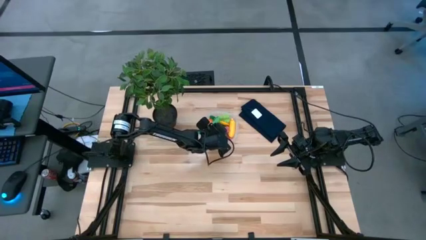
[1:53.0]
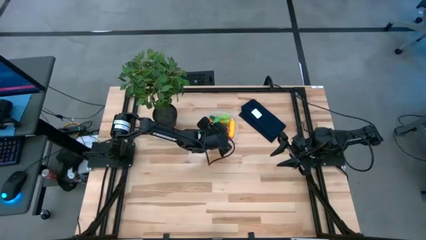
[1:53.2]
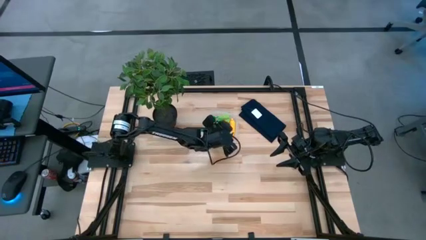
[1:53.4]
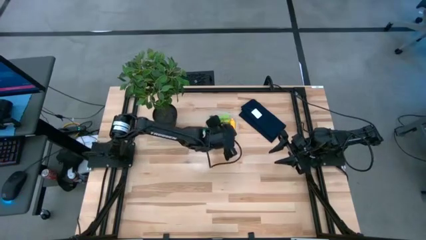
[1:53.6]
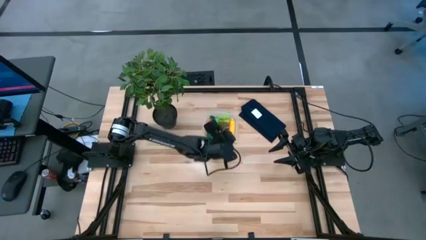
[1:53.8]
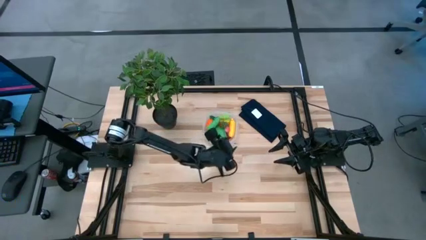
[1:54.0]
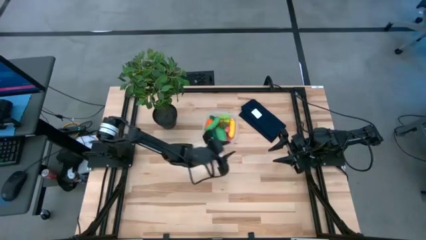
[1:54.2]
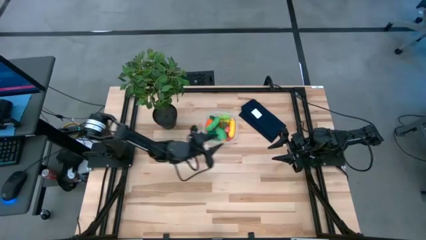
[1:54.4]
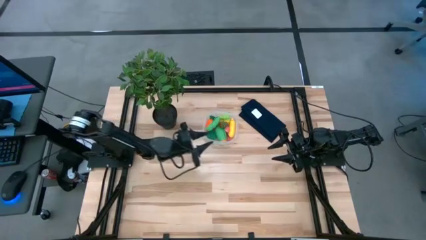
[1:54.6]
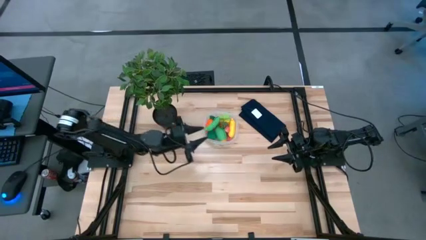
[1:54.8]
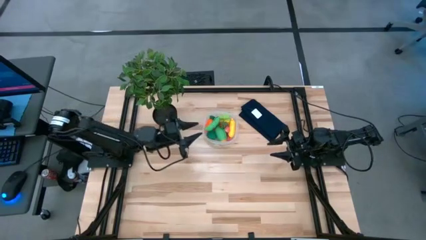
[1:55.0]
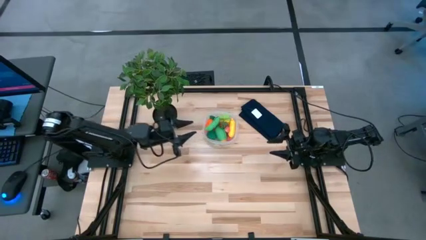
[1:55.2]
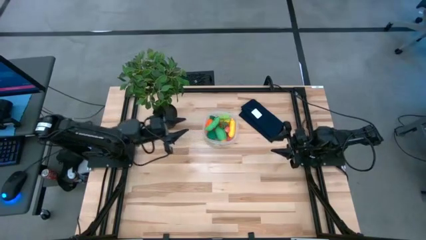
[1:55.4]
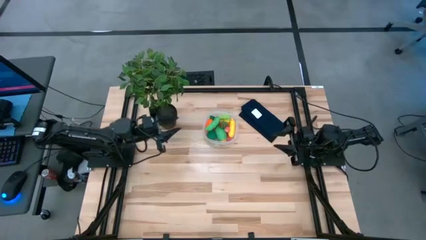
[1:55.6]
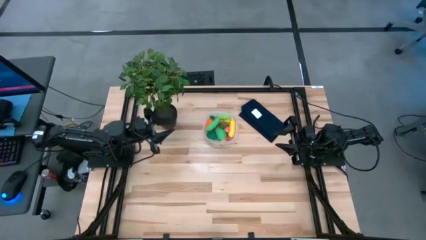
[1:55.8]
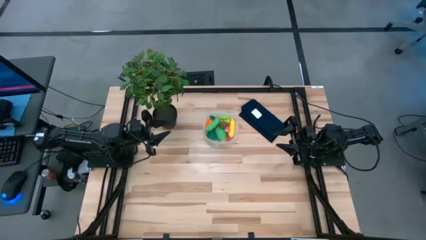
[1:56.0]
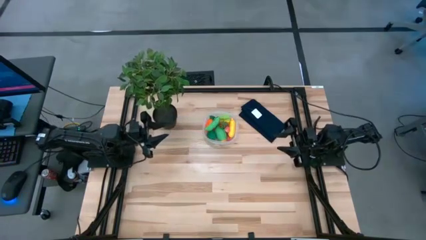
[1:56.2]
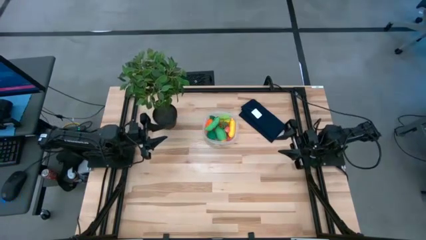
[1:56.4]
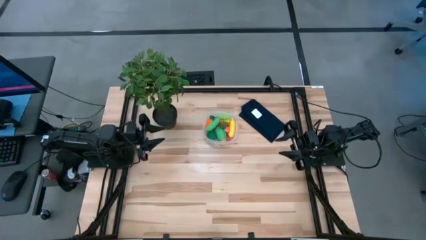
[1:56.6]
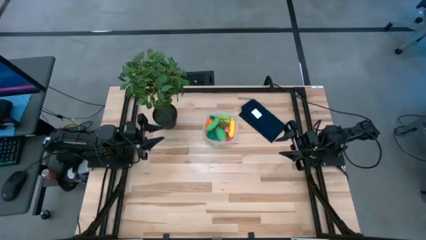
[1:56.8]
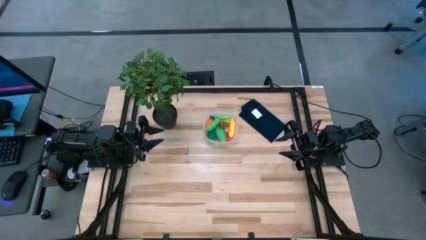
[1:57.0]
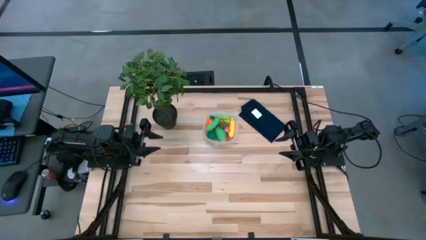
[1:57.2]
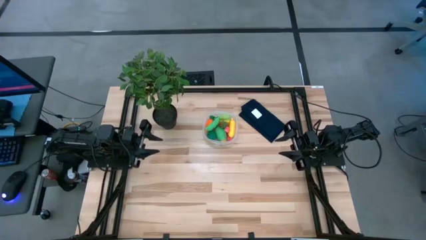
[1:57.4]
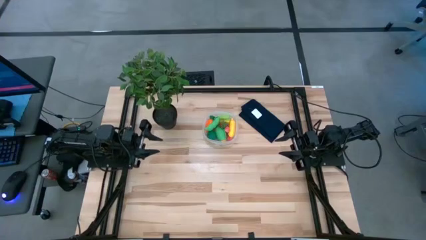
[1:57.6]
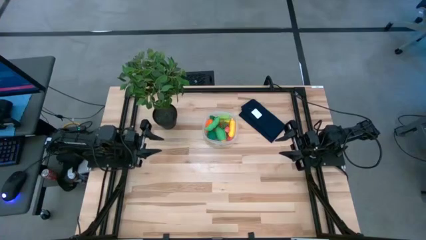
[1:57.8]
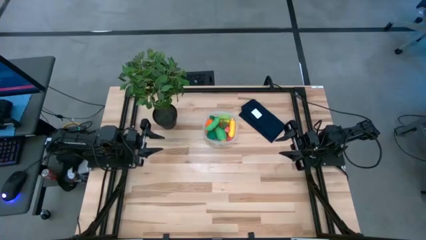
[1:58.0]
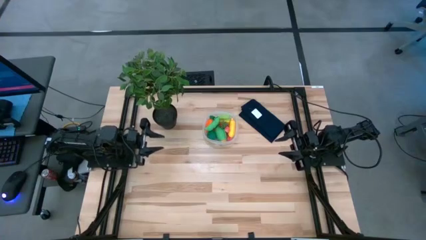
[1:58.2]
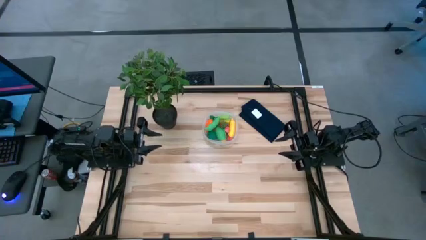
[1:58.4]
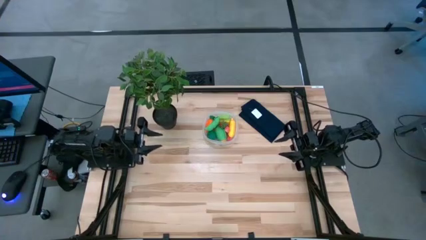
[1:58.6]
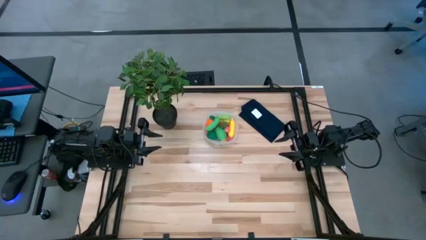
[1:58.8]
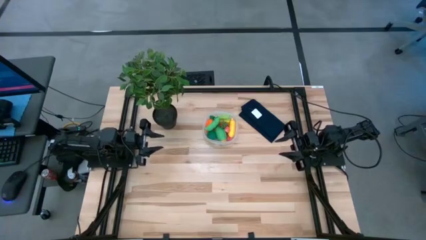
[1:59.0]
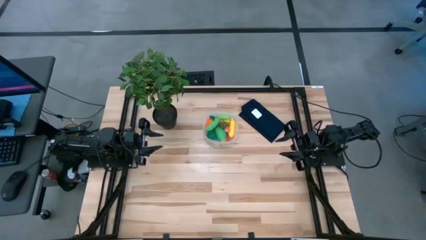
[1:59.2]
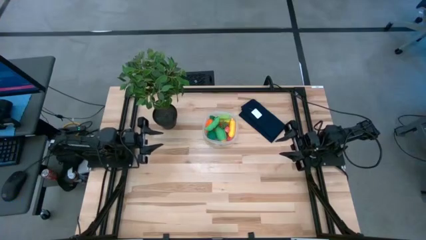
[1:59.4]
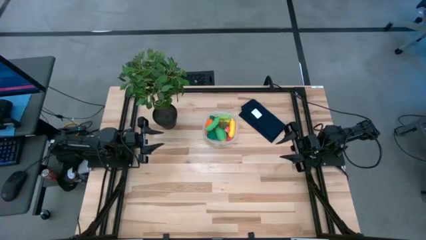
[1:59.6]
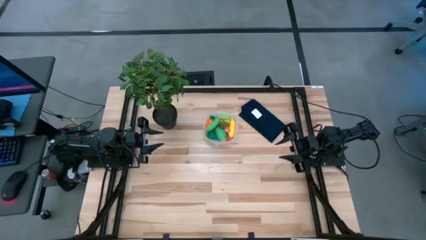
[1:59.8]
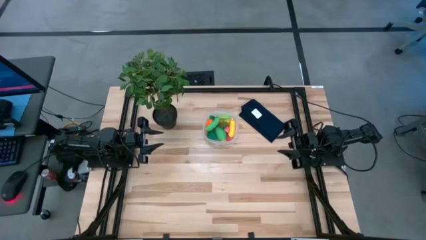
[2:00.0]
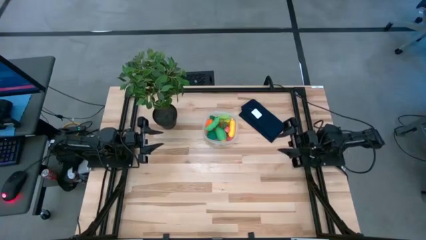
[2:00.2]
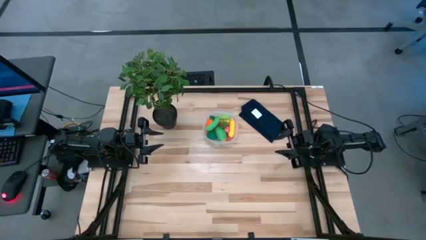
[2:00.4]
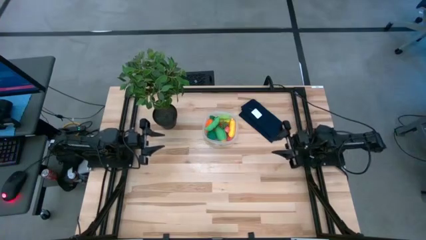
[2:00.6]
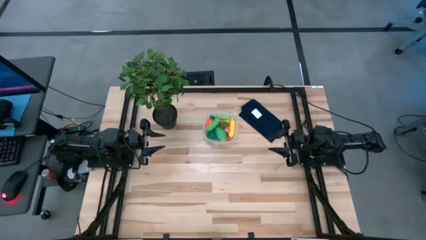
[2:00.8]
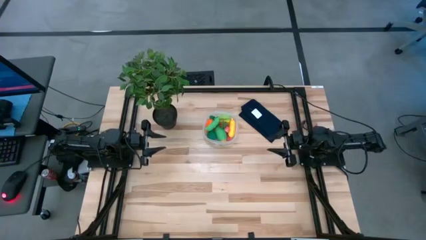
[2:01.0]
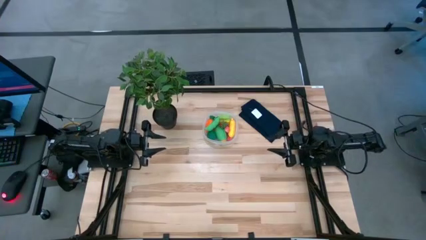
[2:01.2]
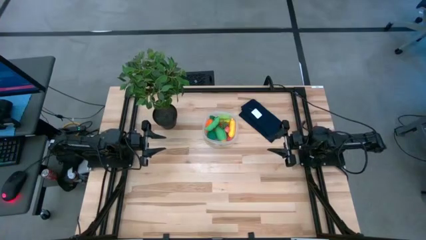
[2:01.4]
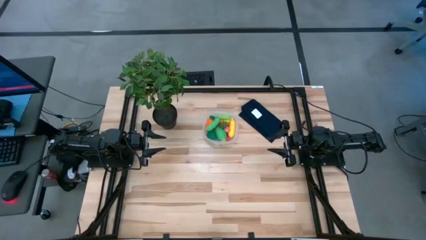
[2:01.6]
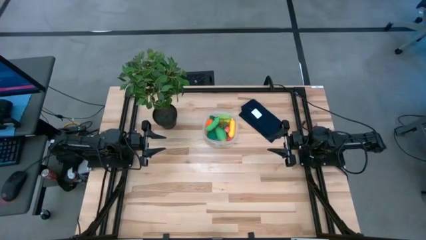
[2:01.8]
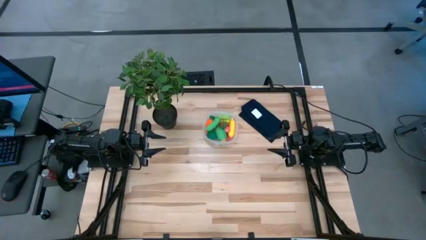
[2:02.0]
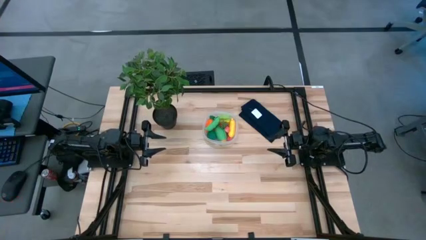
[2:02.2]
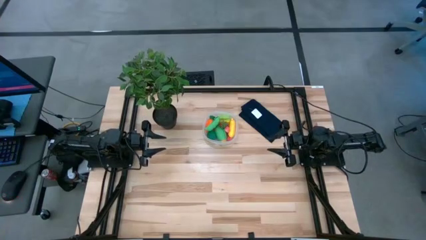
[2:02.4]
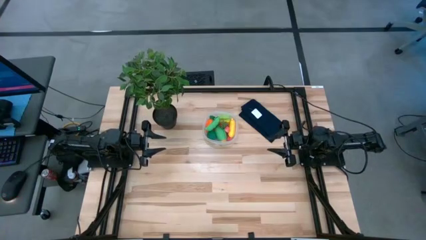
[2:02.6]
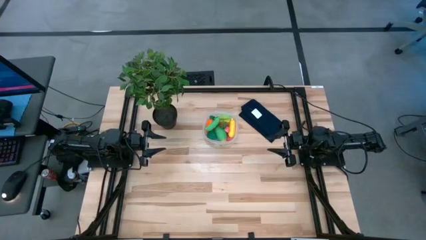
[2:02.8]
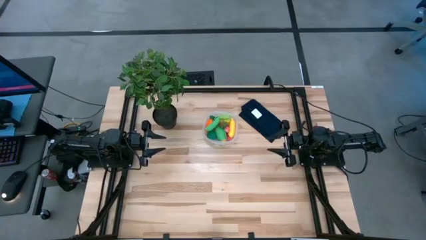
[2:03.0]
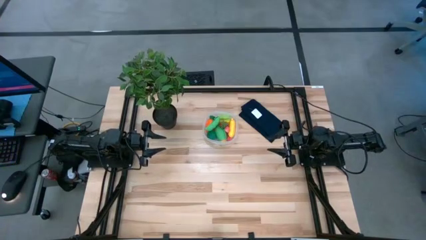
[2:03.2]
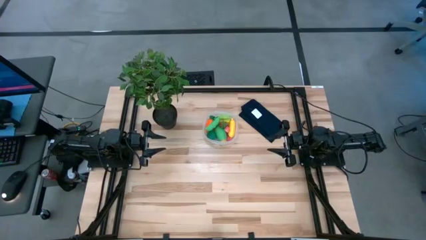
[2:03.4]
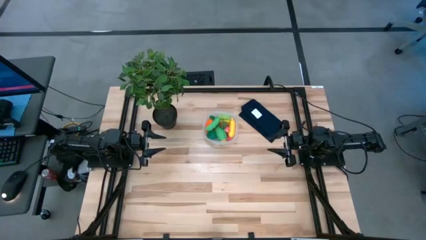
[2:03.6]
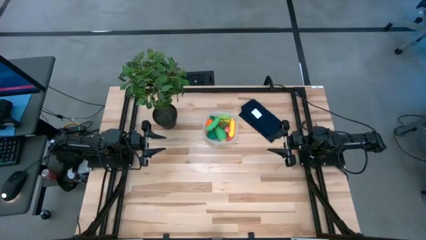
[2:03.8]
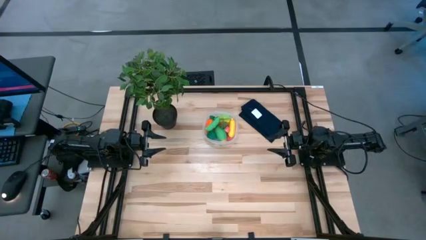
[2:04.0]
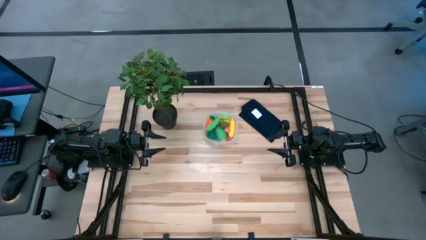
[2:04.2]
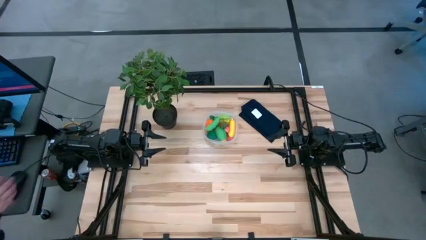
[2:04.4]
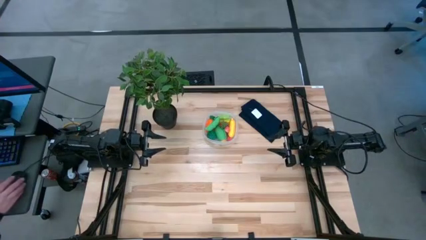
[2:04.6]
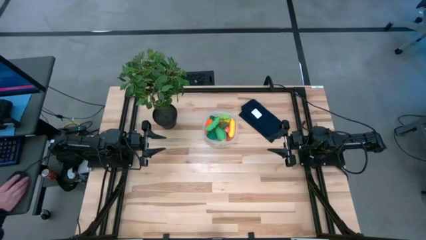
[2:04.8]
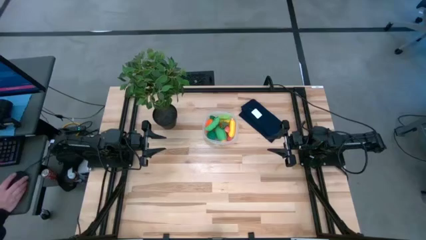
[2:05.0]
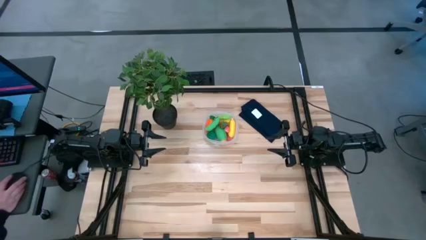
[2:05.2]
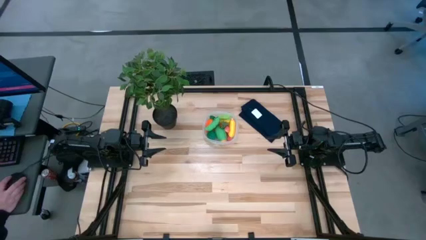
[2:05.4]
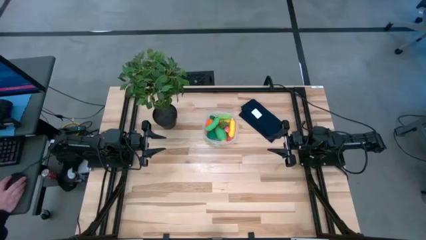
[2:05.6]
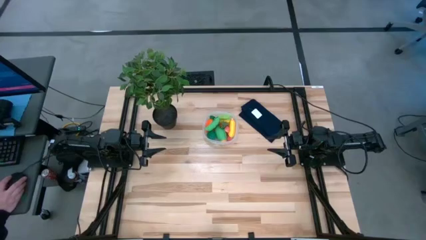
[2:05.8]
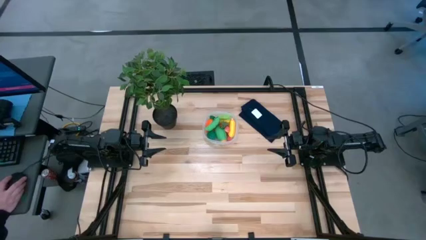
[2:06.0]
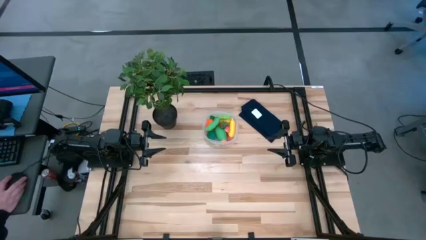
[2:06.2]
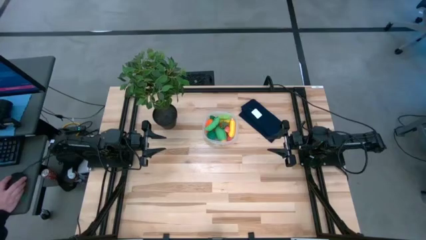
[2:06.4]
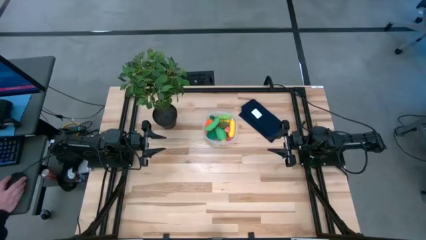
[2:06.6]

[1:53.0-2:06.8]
Task: Pick and placing Produce into tupperware
Return to Home Position
